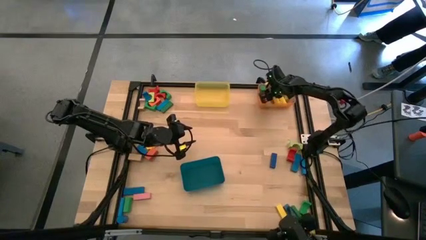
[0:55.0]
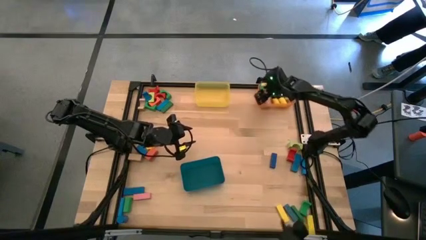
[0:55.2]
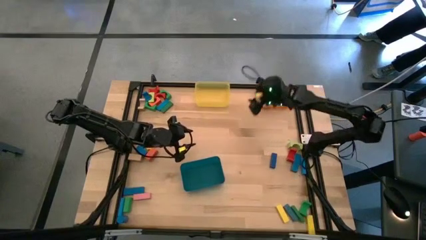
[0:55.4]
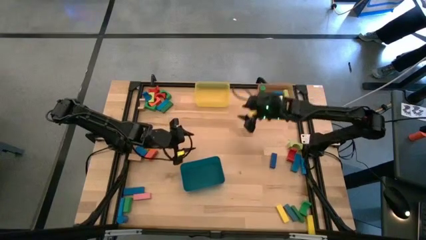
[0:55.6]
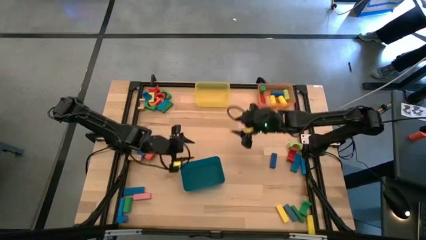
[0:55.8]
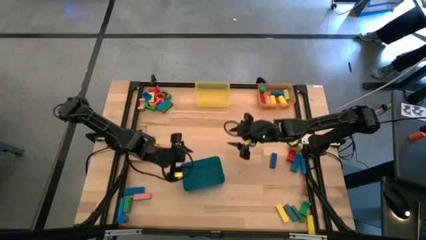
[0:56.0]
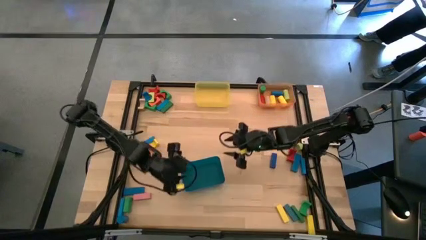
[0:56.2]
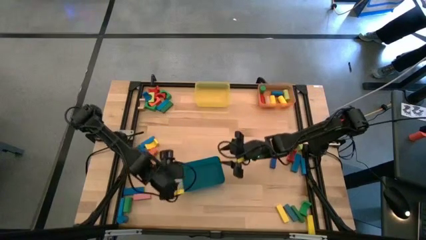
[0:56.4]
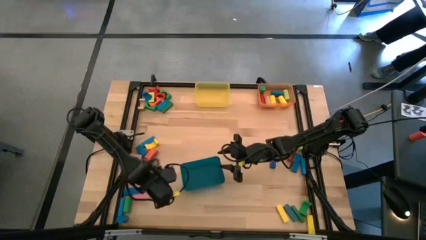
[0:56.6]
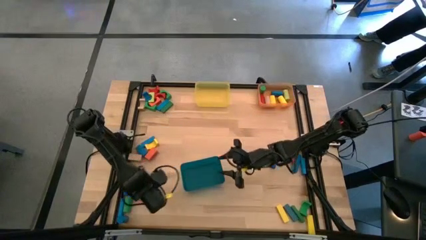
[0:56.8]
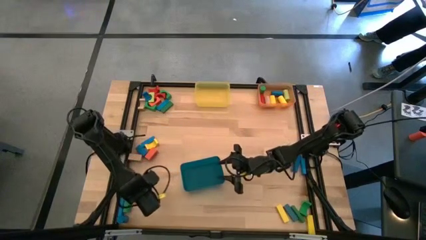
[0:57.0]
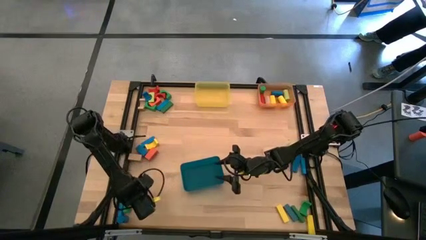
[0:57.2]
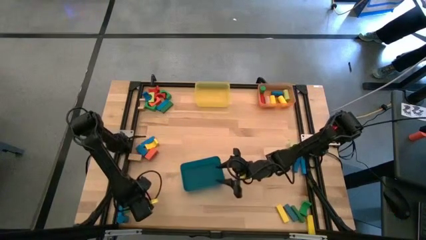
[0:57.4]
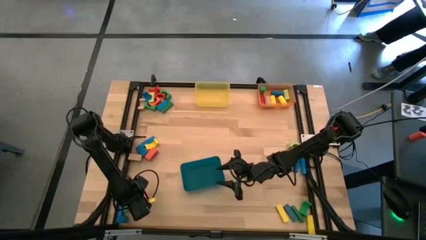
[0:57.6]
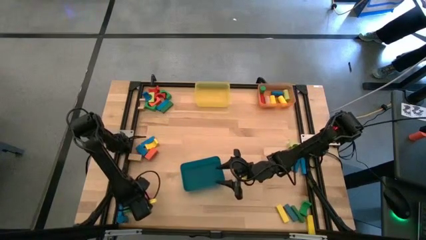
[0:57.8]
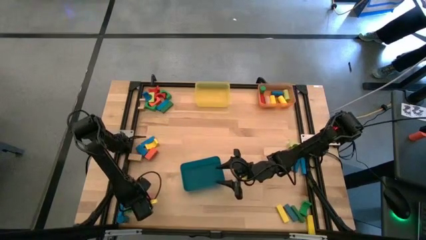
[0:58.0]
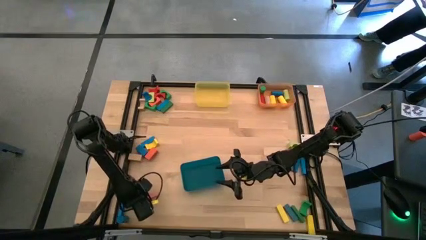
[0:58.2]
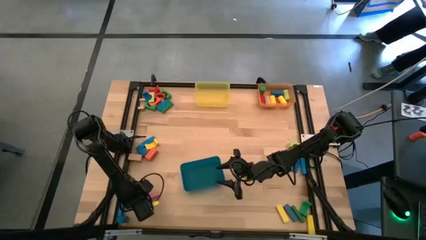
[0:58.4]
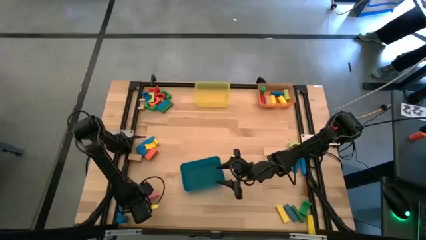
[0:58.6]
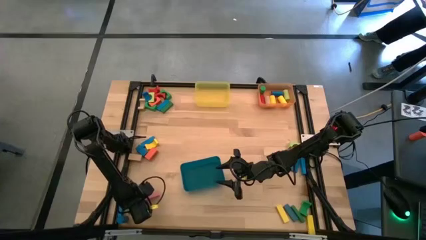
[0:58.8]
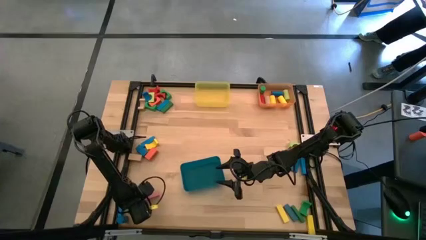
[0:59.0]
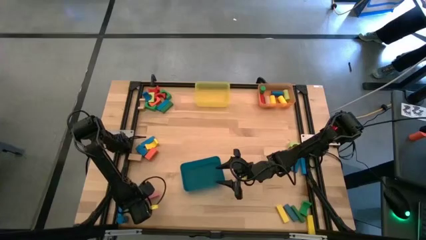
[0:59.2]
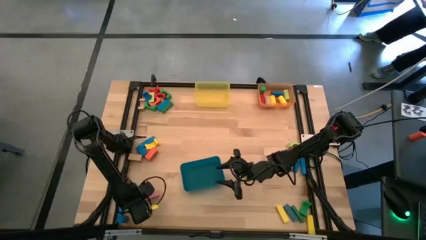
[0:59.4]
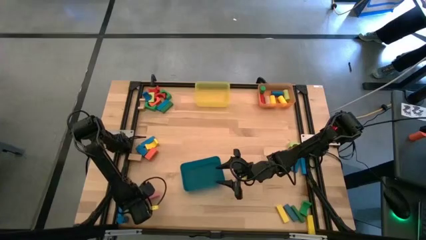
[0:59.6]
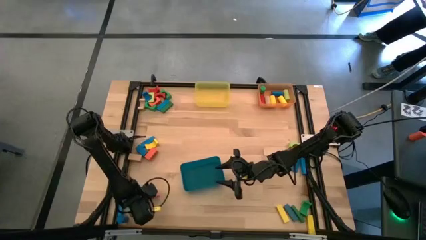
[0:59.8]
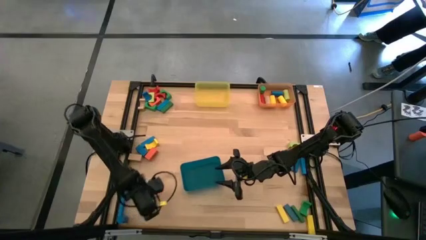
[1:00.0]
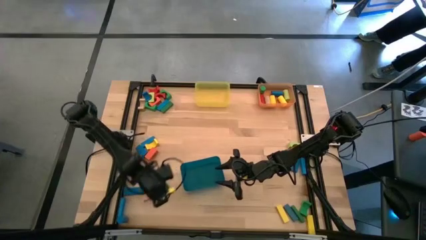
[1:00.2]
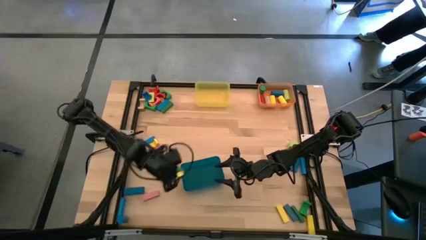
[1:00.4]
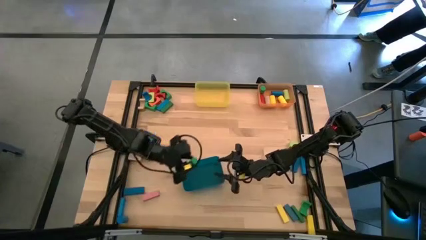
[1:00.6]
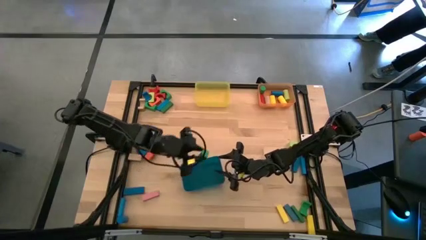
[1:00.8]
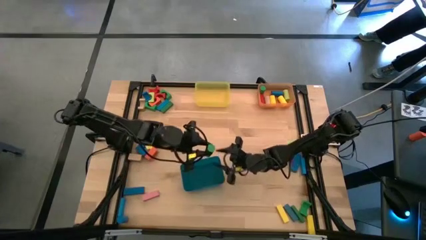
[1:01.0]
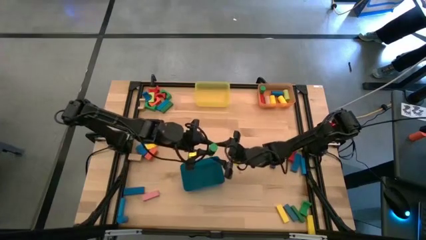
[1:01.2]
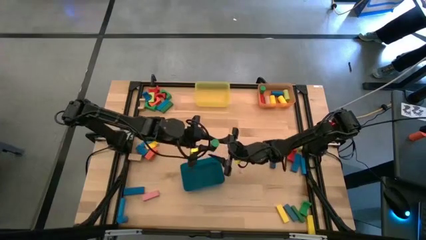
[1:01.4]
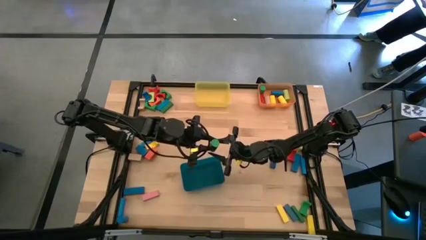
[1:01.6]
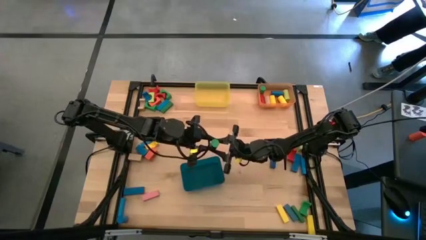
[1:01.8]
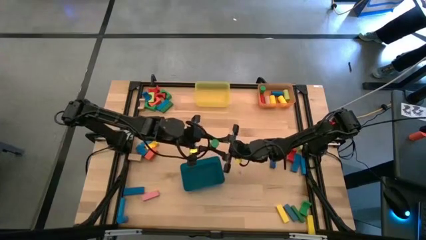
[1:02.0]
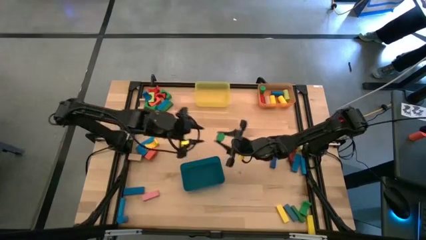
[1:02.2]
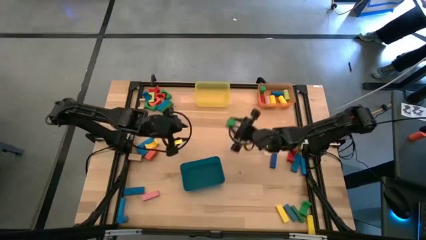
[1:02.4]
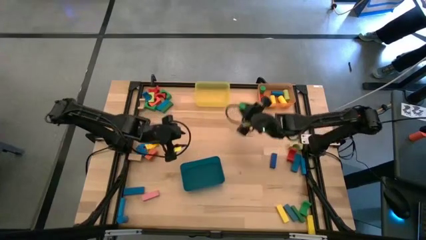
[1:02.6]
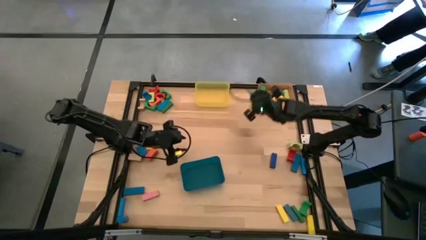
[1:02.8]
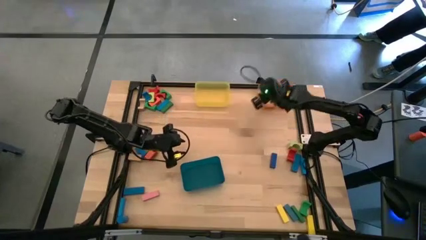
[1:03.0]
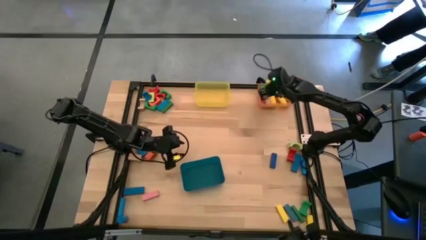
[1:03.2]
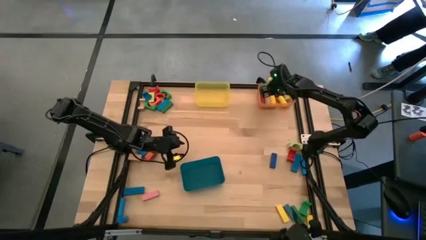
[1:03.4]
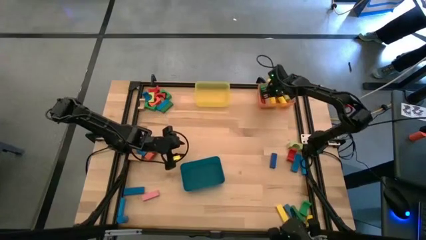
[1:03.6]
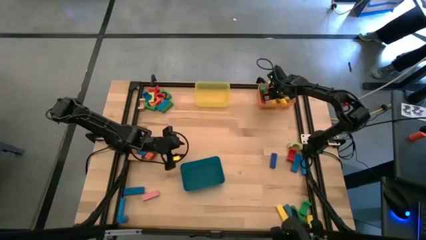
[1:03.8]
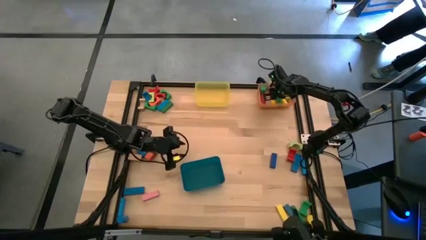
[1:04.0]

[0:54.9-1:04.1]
Task: Sort blocks by size
Put the green cylindrical block into the orange bin
